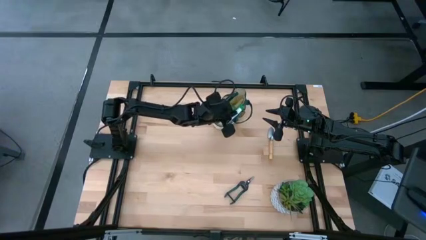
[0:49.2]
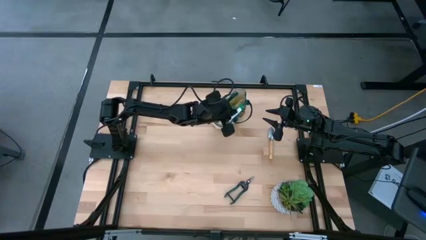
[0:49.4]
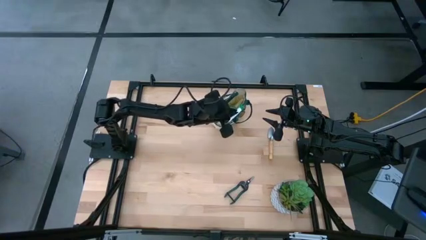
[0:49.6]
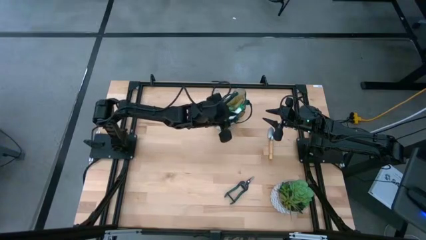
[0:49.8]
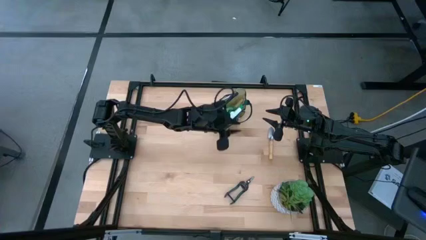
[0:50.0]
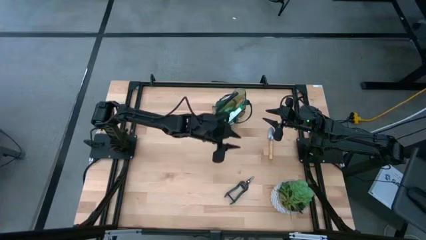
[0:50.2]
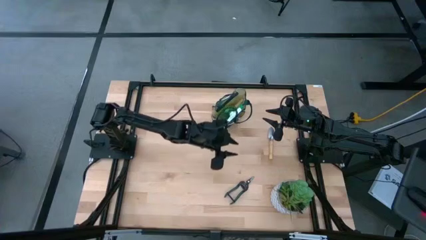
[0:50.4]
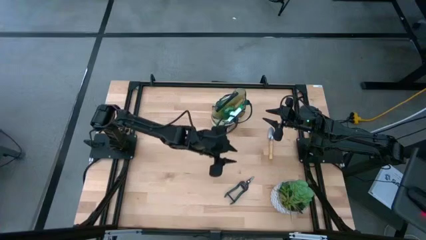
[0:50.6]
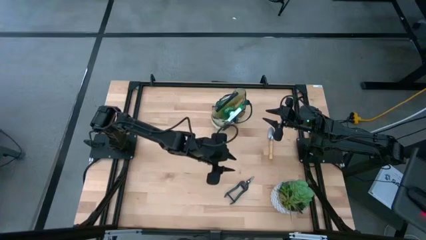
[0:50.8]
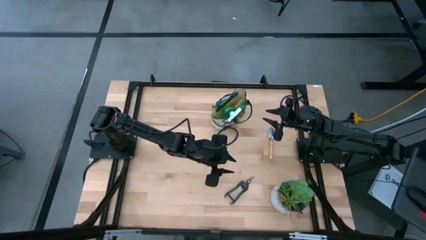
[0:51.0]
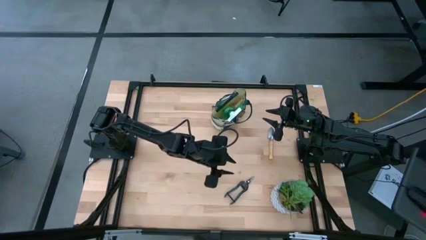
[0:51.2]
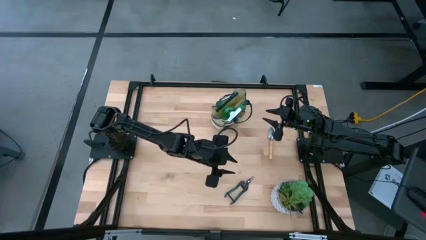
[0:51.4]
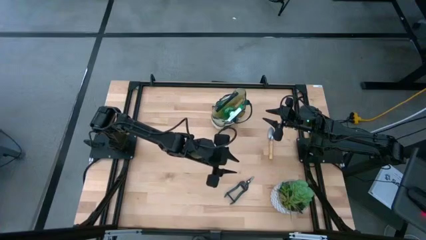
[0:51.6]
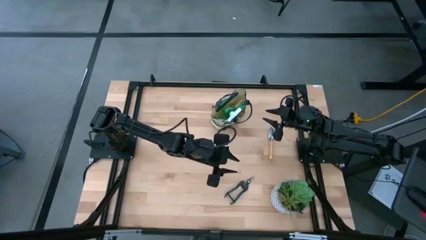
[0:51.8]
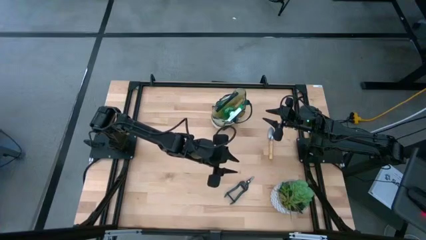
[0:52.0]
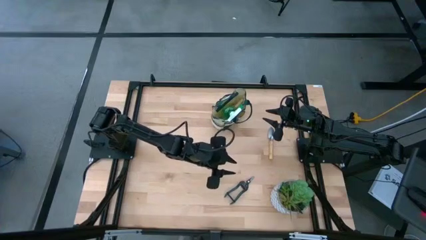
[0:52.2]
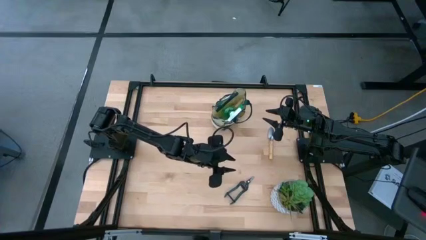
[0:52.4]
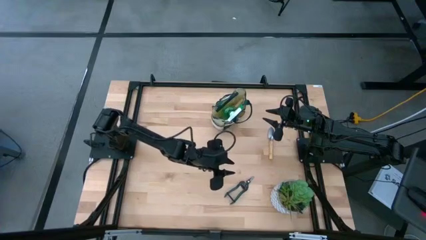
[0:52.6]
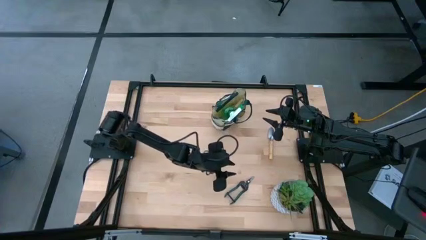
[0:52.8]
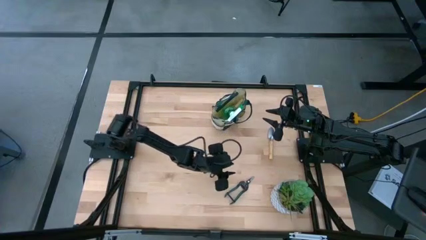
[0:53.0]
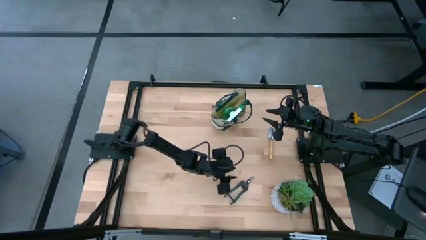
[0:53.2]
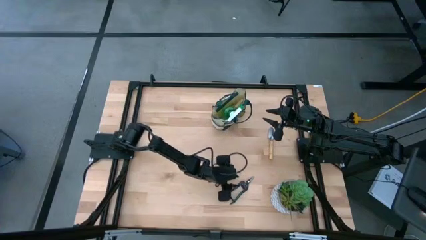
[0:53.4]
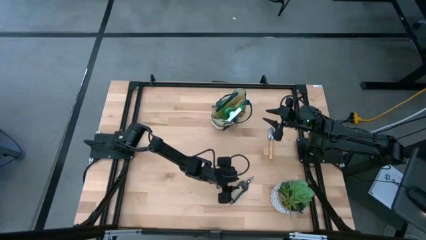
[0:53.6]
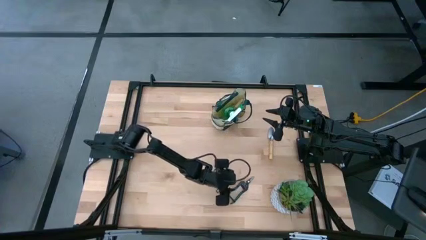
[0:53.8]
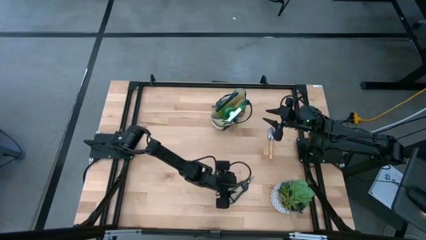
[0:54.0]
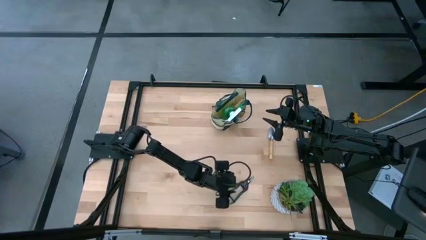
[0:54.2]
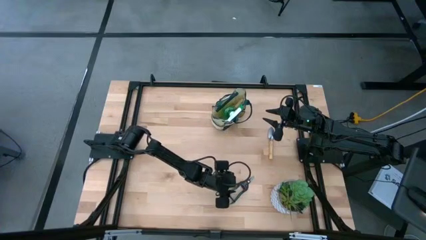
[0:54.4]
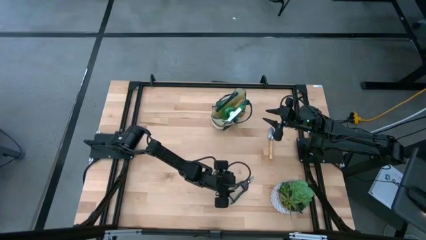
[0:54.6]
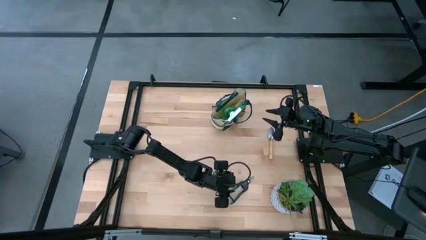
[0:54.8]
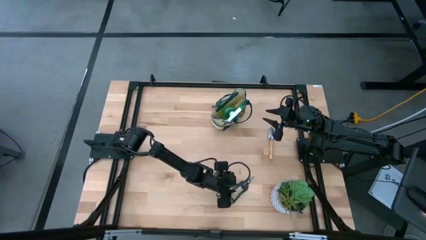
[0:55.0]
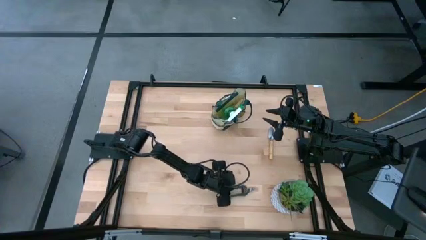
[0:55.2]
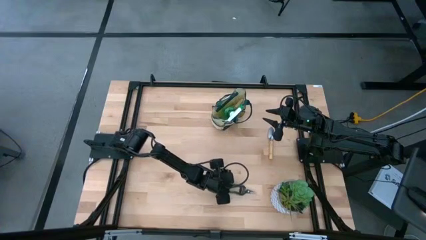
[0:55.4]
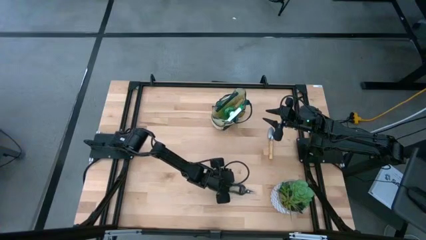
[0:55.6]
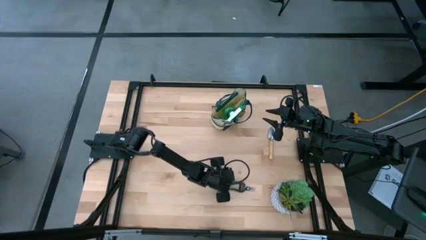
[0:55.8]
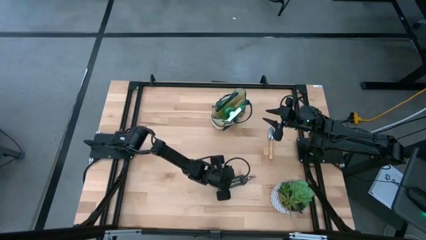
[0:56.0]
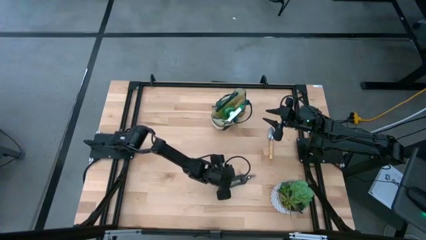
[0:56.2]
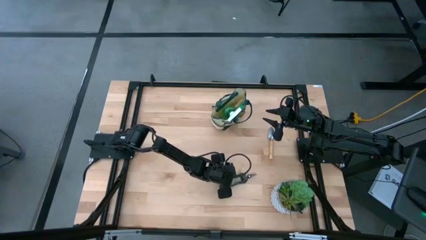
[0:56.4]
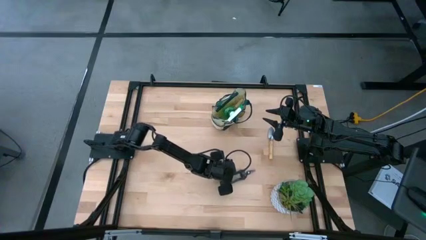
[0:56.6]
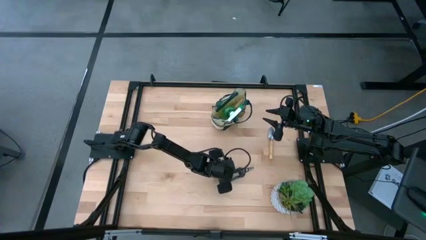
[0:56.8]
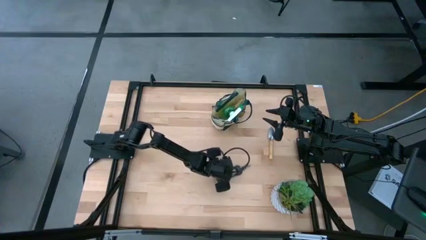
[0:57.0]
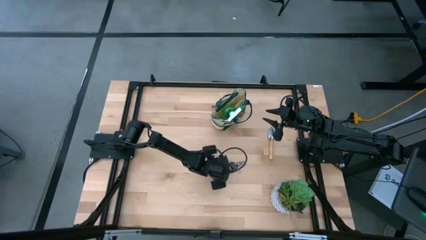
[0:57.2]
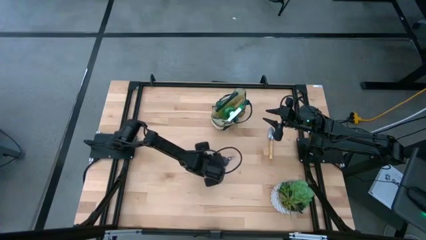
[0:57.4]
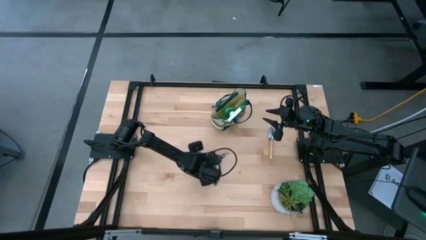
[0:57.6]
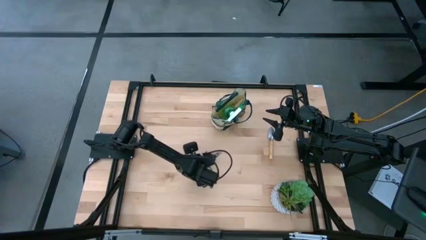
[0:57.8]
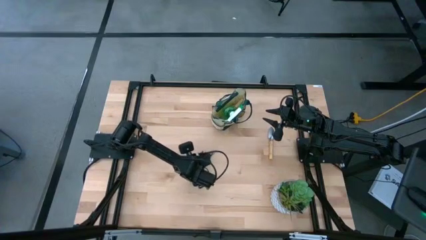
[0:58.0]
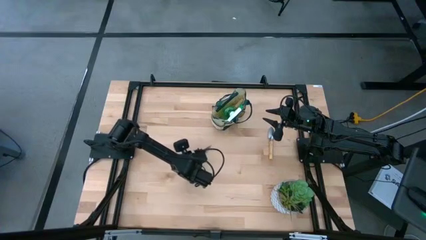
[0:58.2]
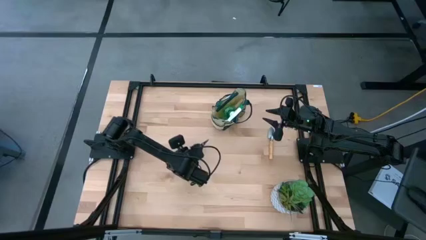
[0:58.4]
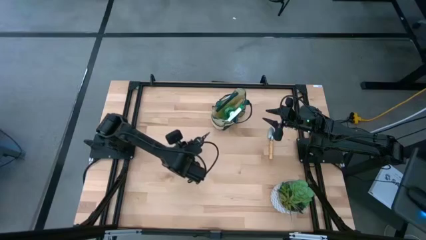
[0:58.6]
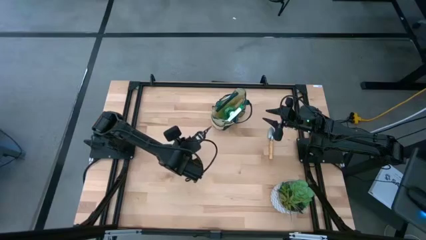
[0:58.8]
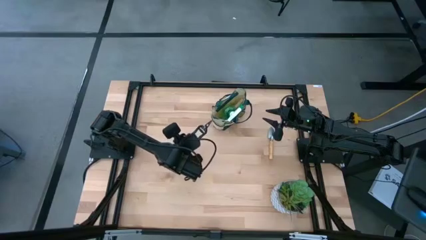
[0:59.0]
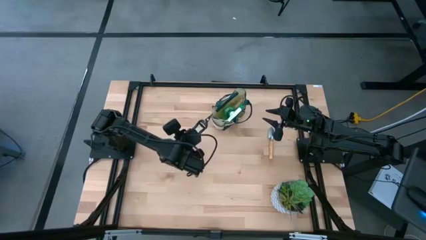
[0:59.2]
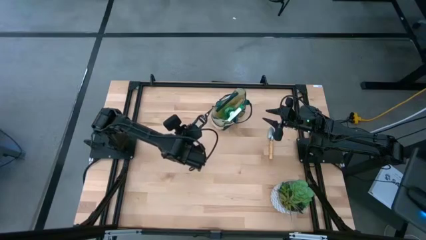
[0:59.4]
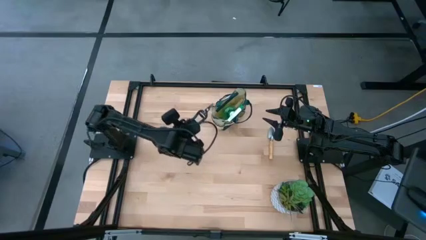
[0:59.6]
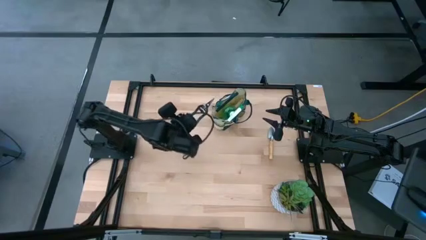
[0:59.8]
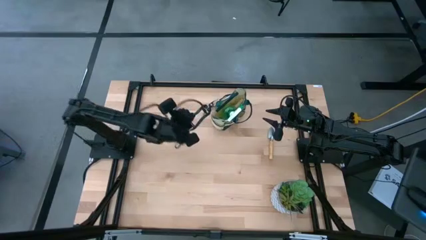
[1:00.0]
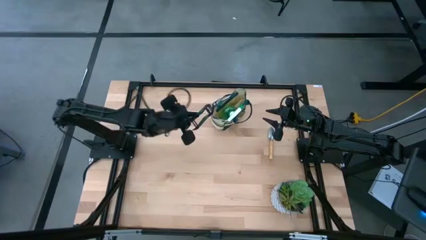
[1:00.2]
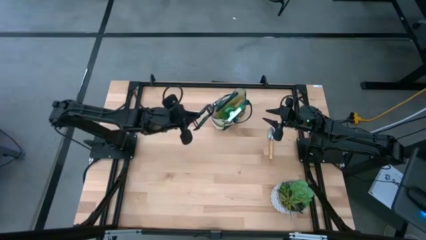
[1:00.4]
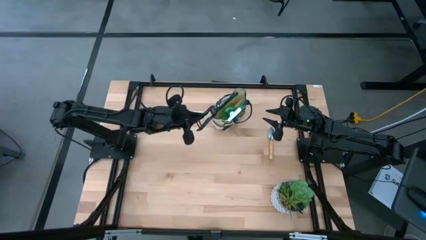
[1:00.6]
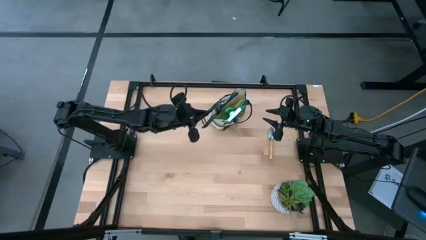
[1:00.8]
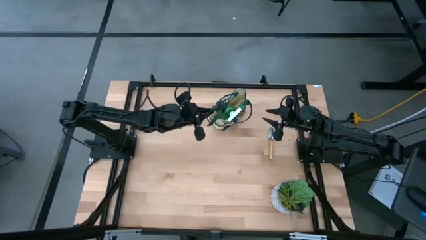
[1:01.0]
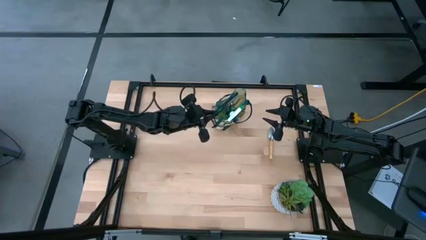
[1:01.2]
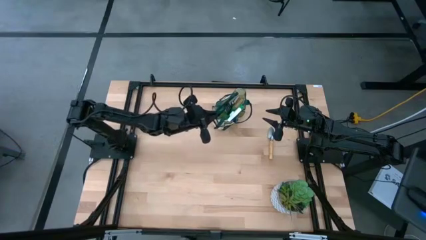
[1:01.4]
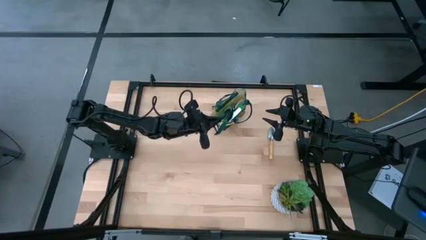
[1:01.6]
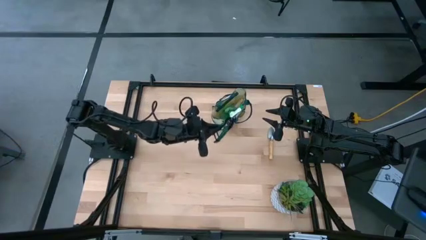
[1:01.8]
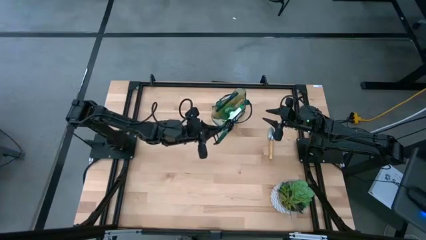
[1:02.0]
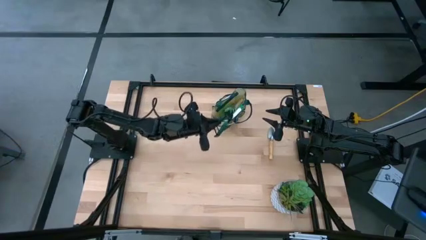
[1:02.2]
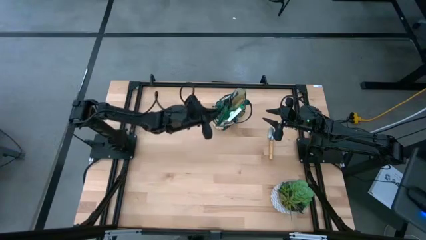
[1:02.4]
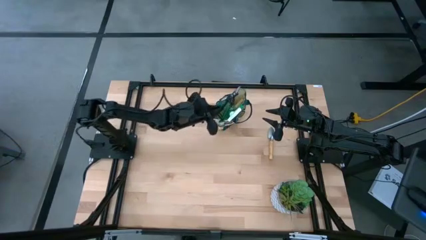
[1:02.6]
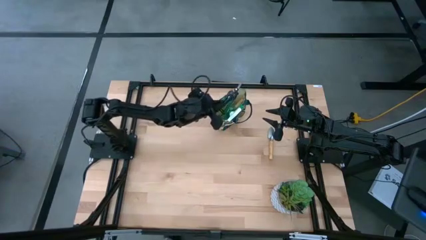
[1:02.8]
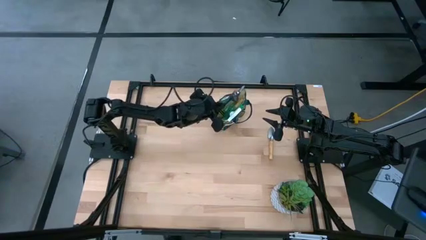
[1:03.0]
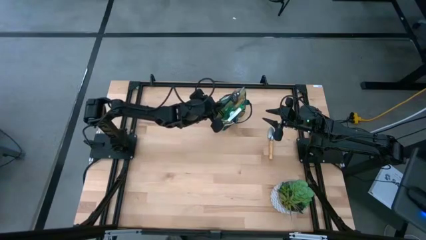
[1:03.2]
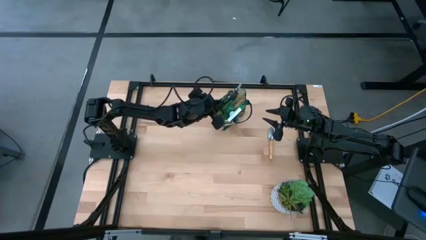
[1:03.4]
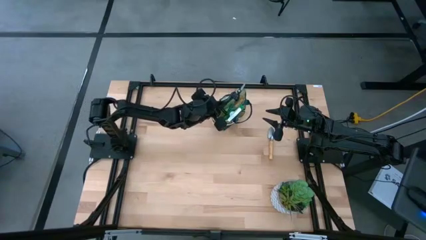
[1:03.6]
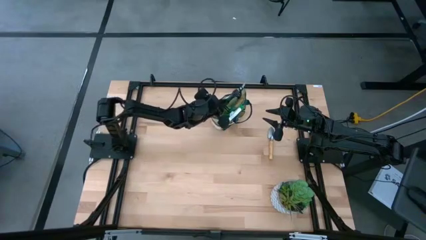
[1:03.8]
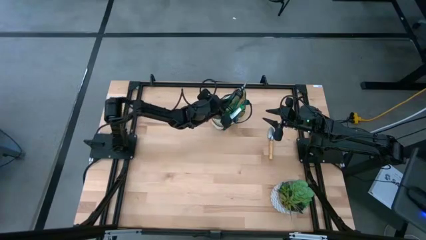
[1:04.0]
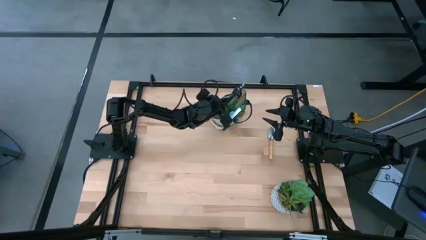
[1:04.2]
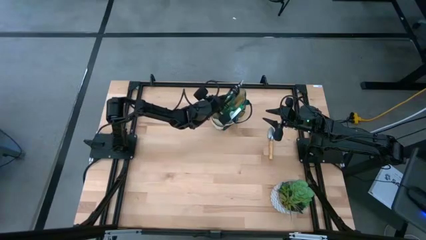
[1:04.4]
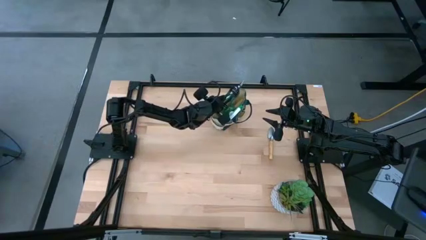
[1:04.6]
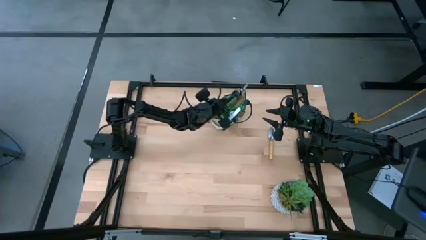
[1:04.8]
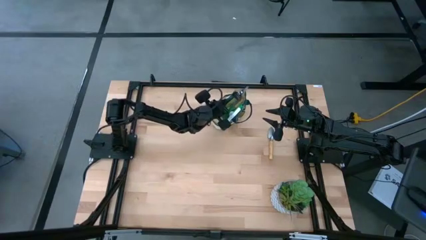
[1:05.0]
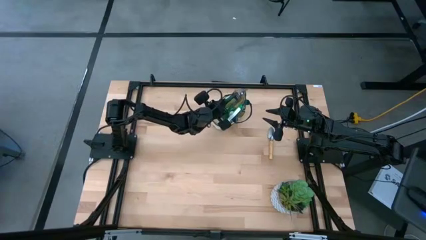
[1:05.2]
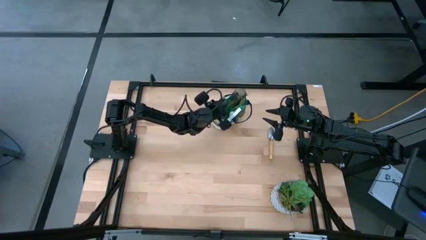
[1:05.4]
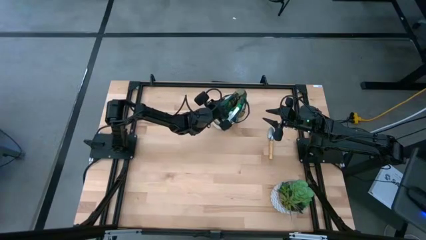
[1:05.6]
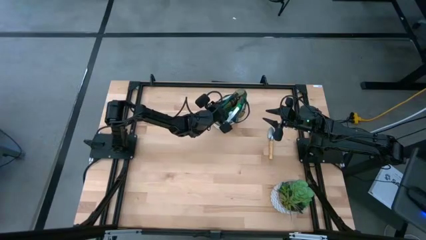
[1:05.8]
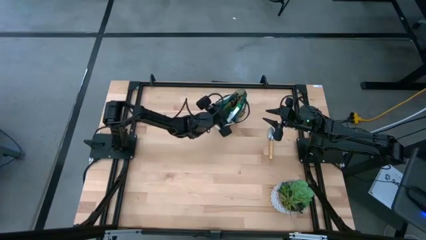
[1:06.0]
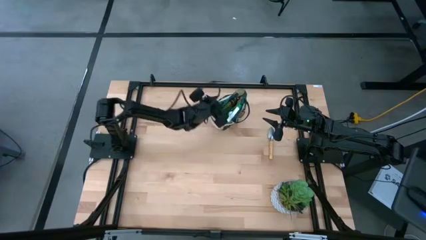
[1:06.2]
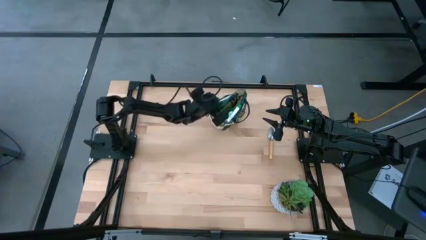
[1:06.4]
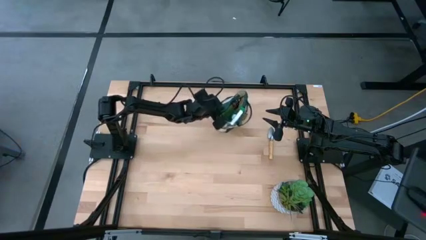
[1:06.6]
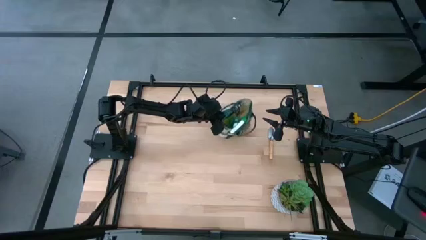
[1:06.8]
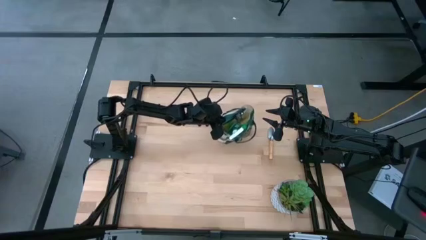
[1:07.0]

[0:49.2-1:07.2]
Task: Pick & Place Garden tools in Gardening bag
Put the fruit pruner into the green gardening bag
